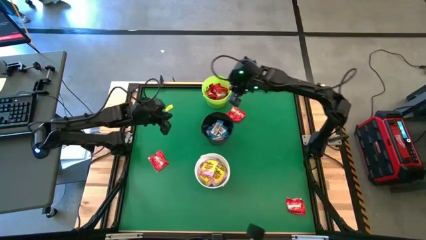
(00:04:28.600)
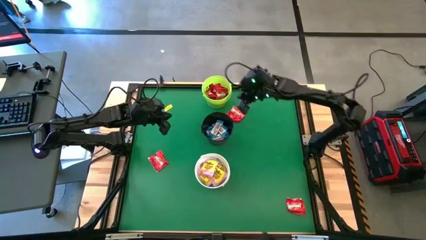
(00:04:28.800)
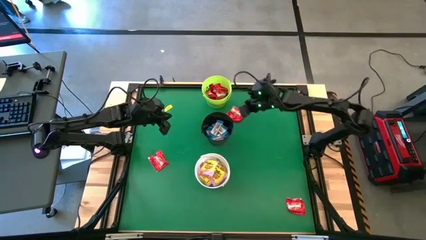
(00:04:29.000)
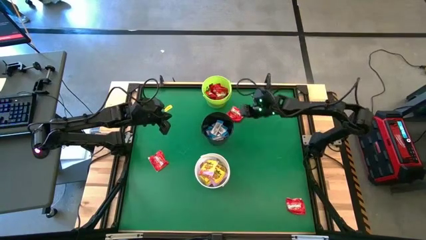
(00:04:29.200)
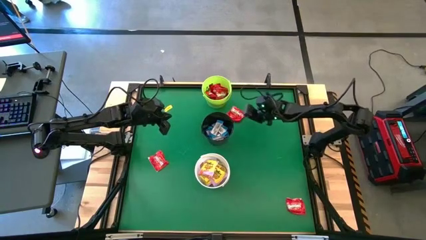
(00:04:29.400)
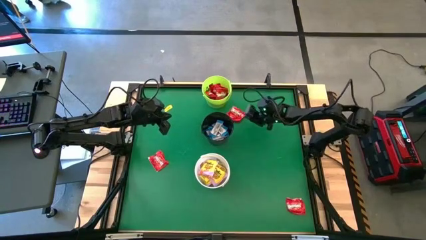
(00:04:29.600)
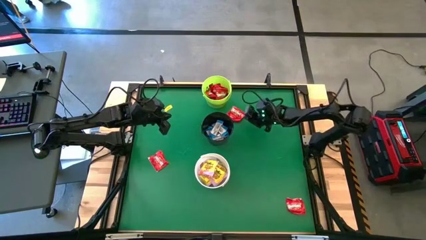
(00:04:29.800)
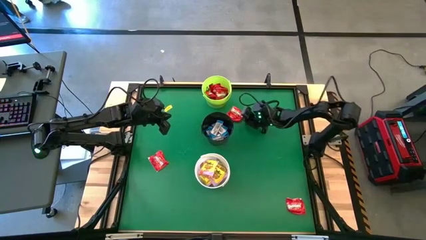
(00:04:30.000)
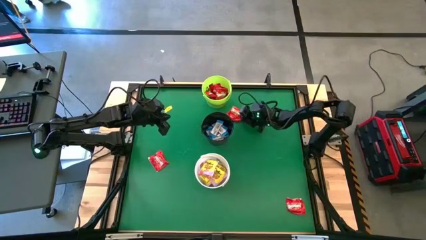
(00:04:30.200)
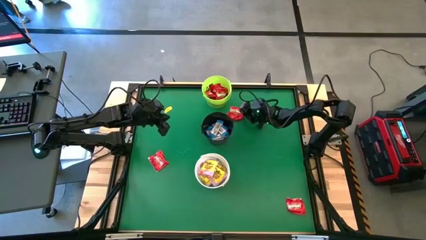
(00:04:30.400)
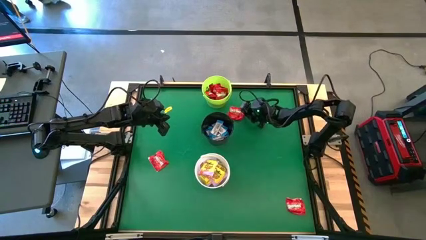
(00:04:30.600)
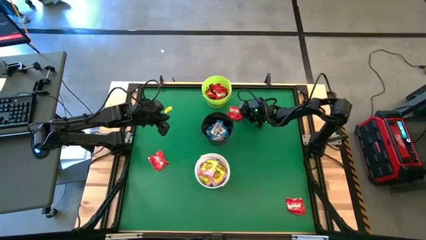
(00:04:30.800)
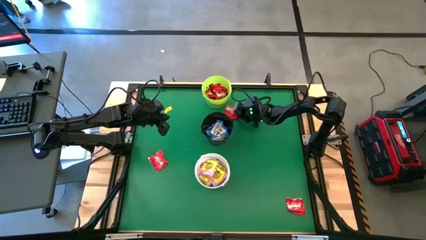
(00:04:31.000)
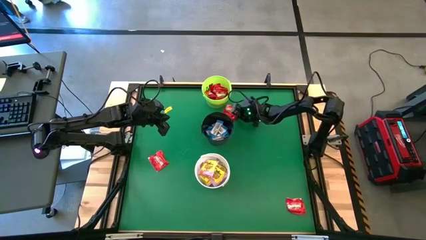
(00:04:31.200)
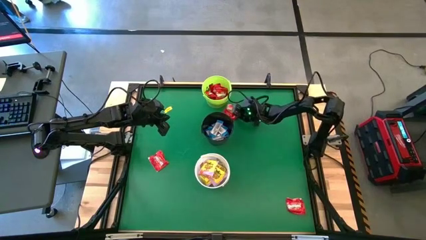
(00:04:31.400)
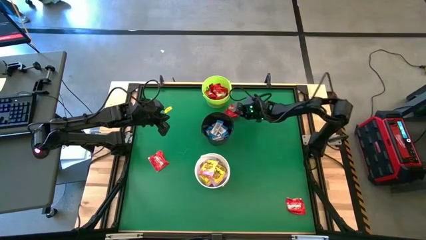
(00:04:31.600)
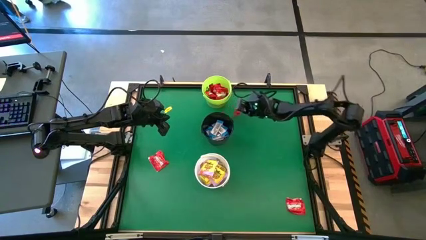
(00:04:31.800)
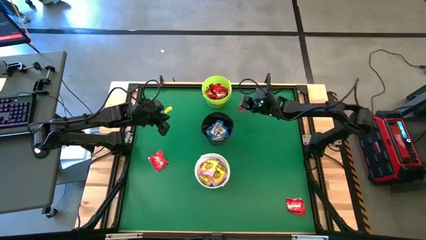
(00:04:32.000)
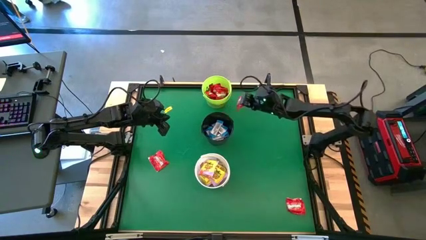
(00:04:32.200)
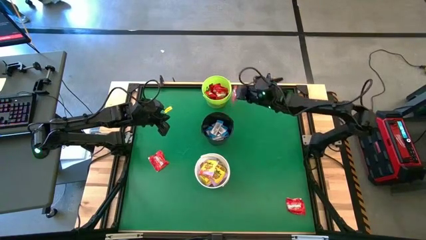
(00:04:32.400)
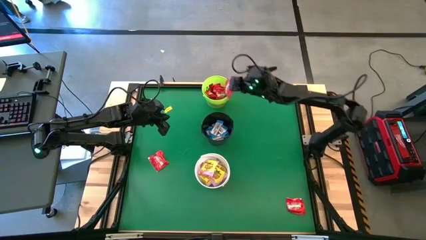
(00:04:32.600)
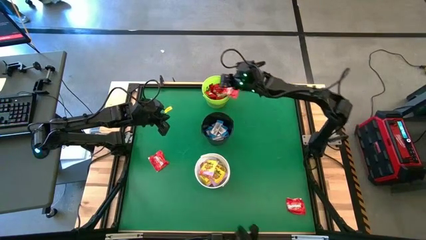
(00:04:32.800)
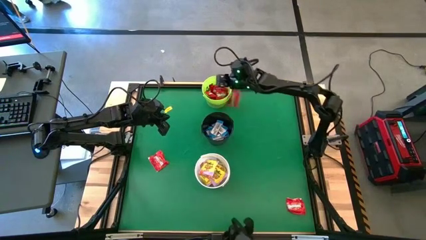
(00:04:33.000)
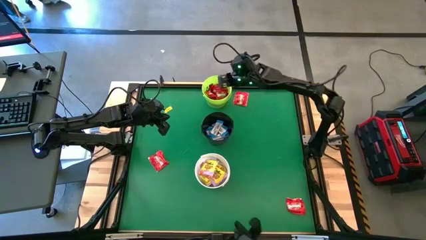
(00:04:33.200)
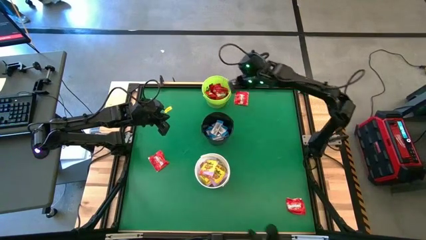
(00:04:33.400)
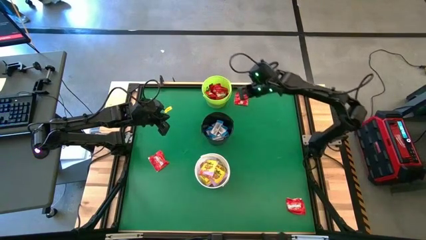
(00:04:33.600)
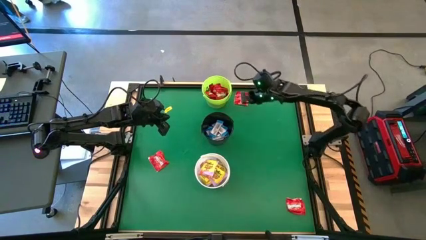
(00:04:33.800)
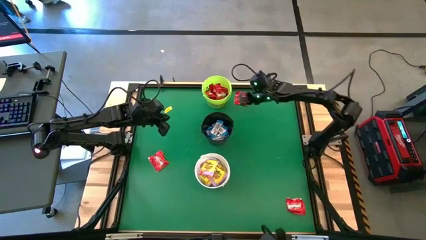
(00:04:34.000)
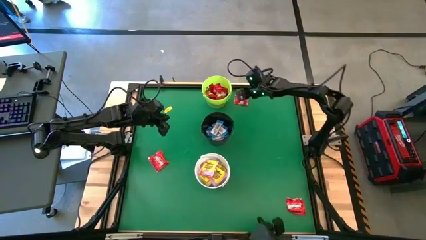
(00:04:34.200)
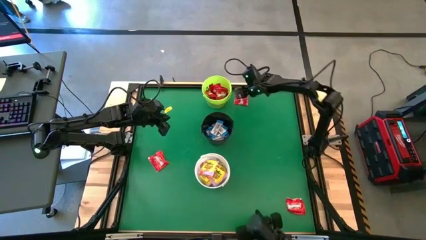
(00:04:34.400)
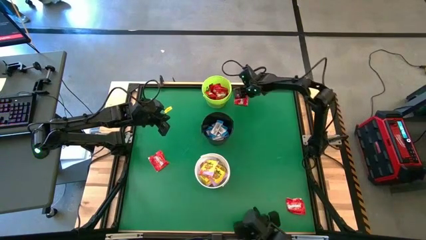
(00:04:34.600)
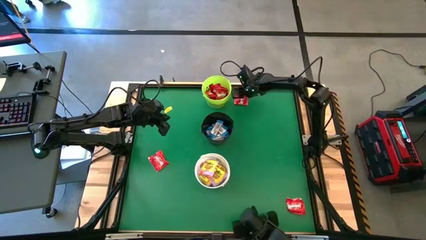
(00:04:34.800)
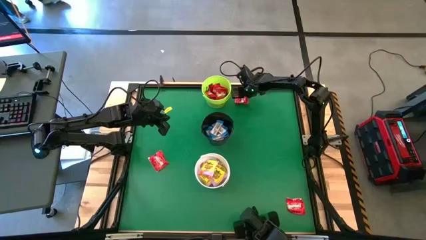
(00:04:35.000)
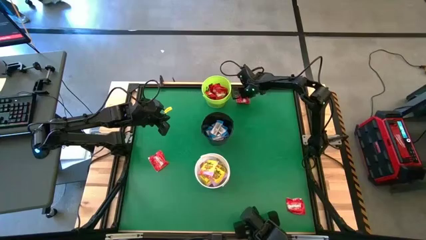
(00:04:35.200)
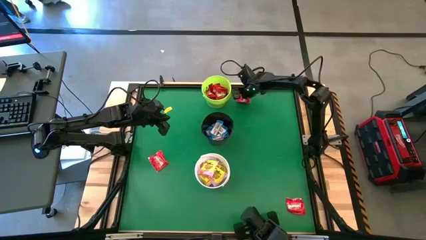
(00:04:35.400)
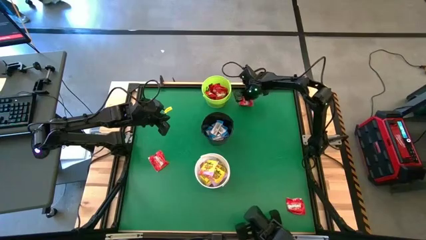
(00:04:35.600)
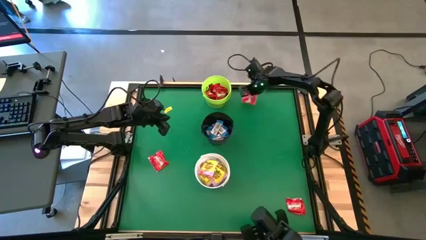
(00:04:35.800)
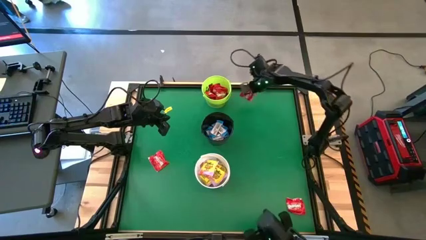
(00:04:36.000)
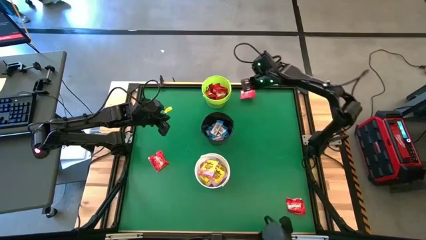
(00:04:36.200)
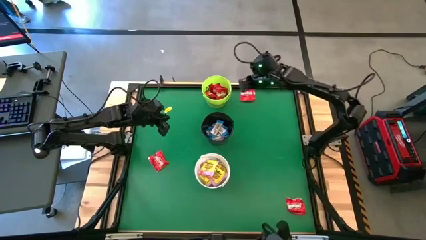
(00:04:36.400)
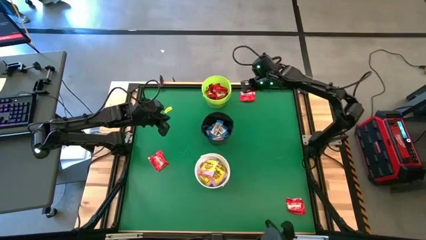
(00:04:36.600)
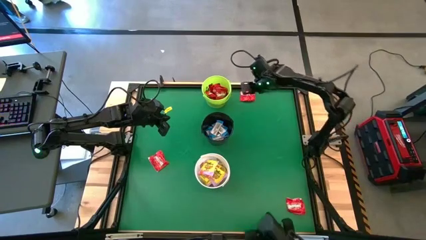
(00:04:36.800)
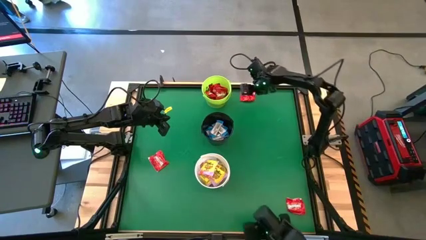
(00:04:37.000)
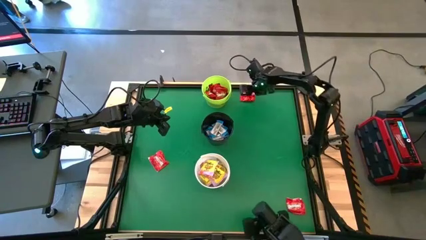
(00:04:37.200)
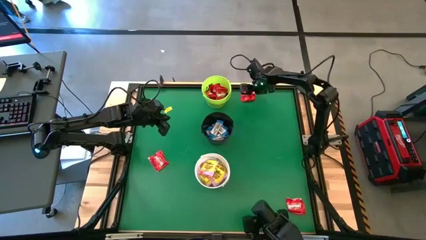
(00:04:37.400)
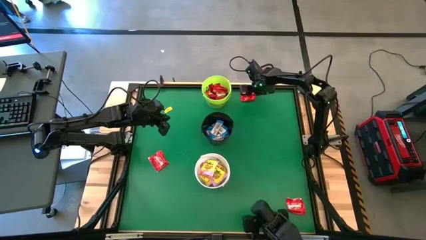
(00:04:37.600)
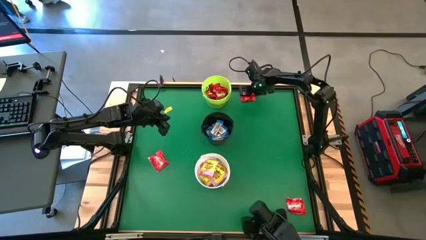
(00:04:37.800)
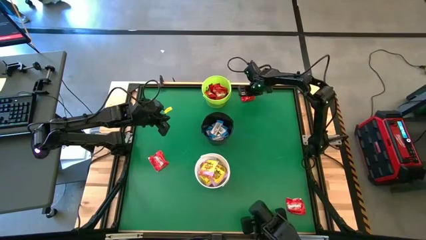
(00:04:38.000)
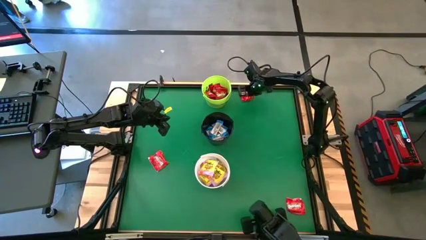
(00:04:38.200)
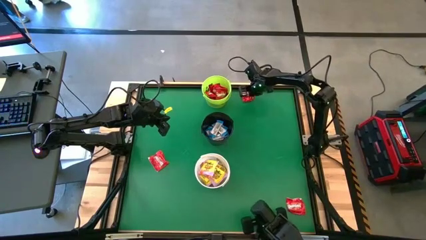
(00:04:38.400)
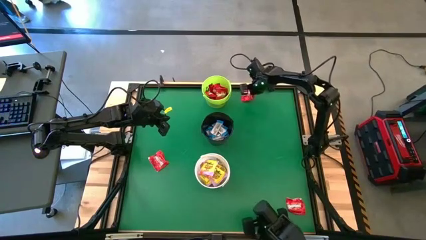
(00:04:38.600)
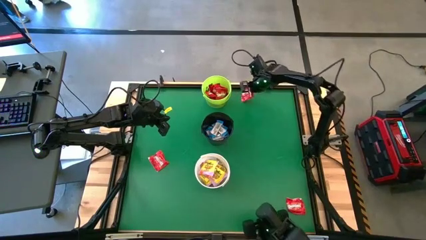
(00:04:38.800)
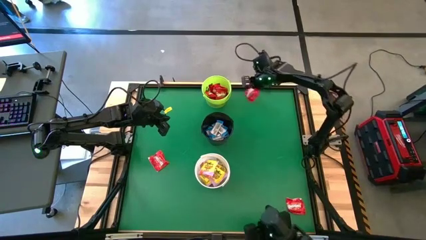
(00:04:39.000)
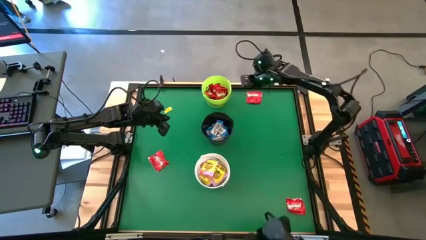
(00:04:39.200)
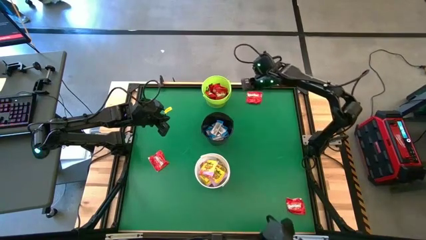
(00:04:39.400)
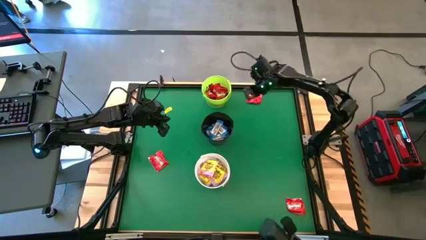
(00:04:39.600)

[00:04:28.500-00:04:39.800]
Task: Sort candy by brand, put in halloween buckets
Put the red candy into the green bucket

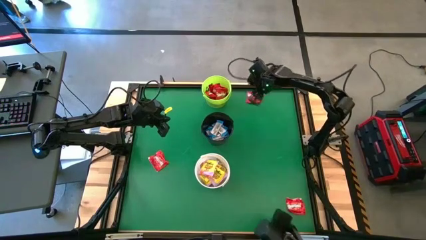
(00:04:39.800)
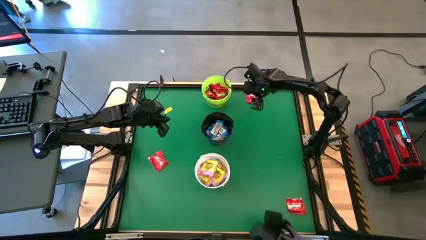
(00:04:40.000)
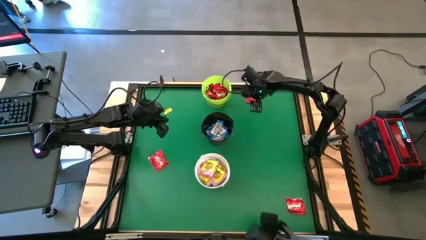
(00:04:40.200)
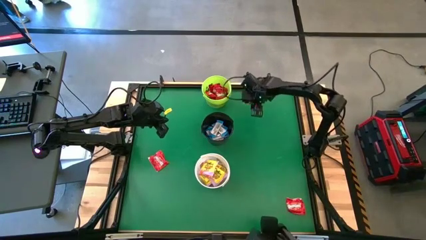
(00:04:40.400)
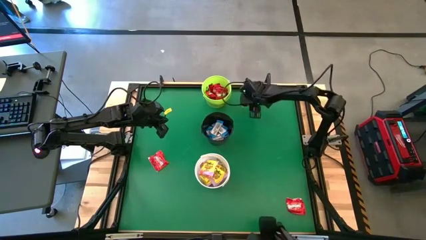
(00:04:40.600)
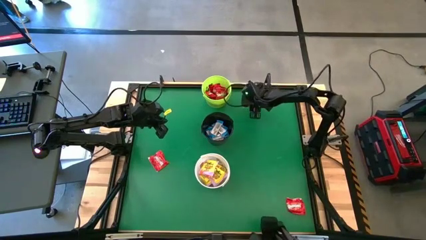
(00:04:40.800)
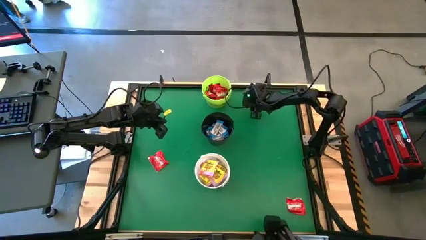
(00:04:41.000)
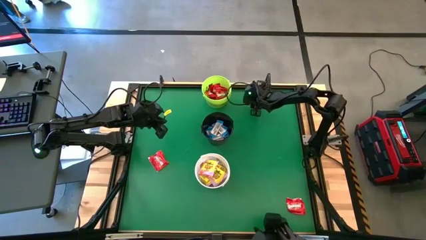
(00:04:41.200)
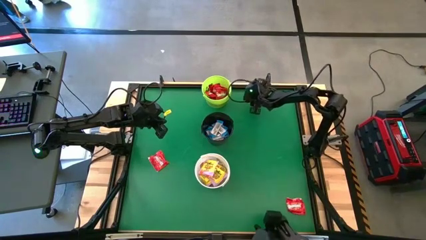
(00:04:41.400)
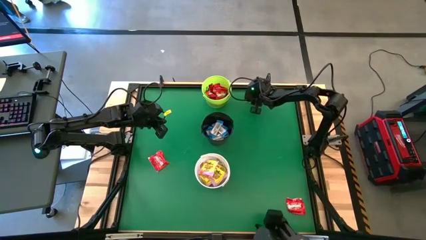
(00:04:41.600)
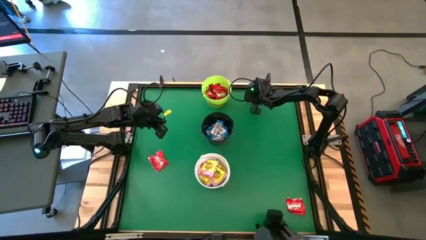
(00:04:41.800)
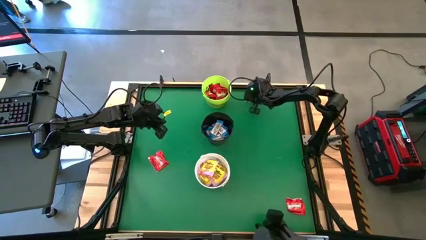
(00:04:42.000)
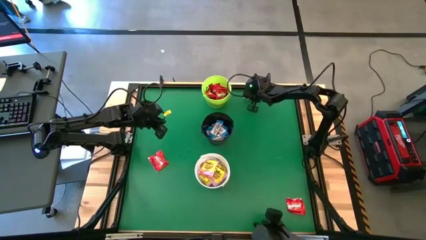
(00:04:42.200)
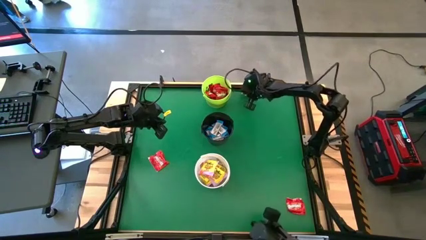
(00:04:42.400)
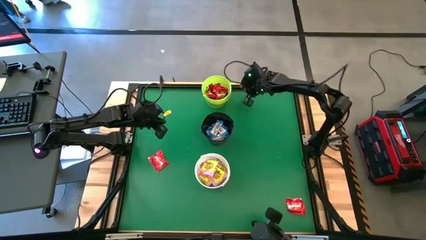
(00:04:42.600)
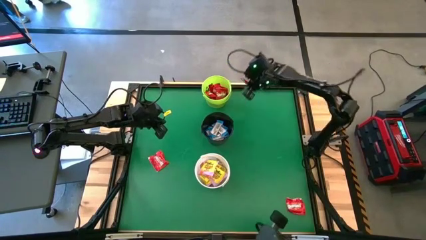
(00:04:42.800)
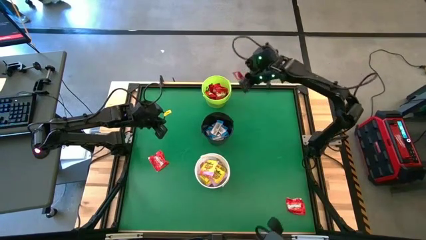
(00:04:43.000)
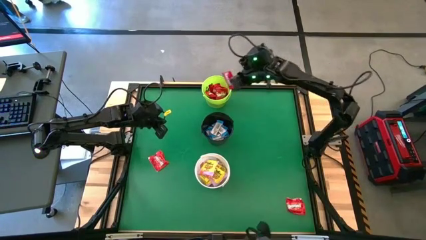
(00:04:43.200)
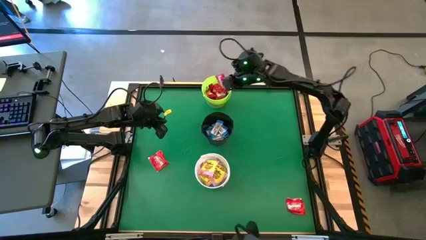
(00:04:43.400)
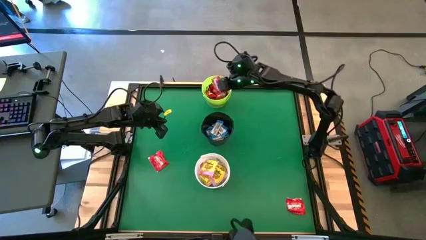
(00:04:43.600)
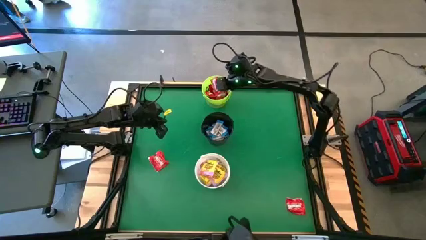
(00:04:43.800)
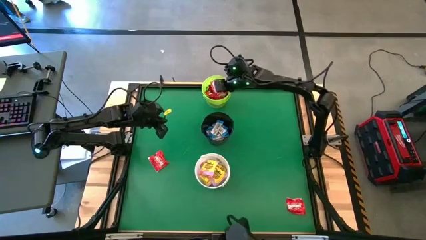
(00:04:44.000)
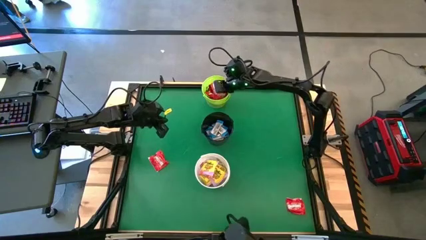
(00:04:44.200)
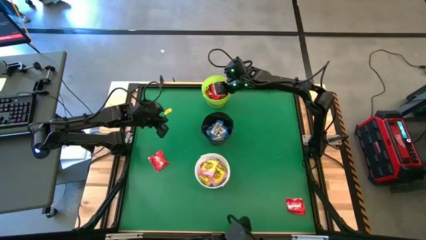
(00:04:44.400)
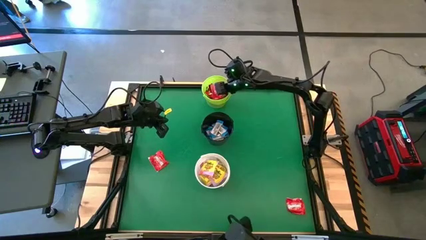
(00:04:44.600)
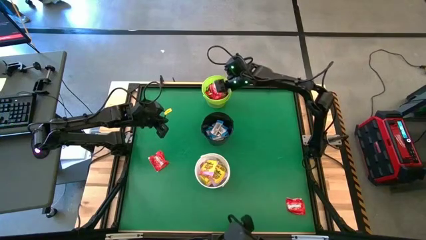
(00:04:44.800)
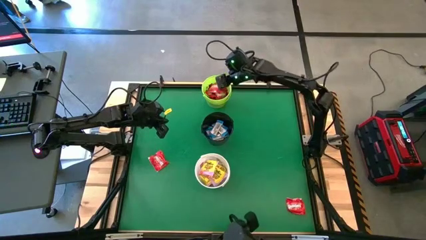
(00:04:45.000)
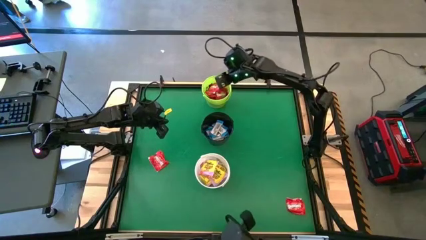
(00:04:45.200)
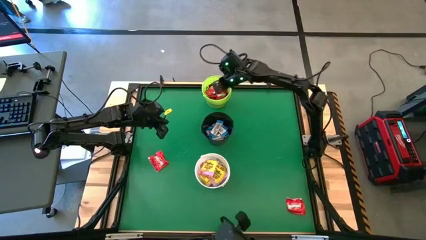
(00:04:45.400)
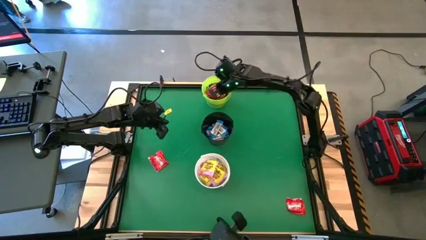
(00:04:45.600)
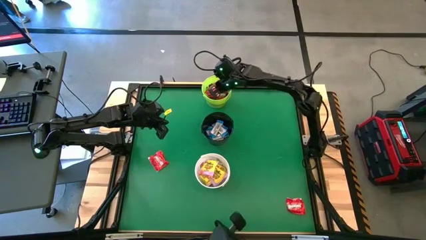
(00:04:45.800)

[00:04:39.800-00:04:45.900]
Put the red candy into the green bucket
